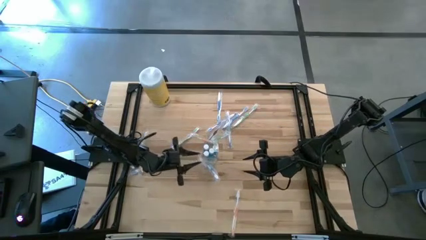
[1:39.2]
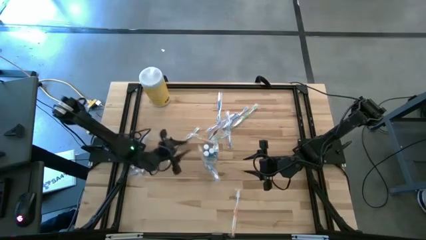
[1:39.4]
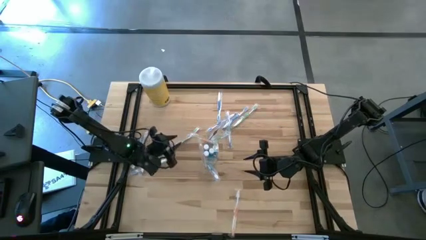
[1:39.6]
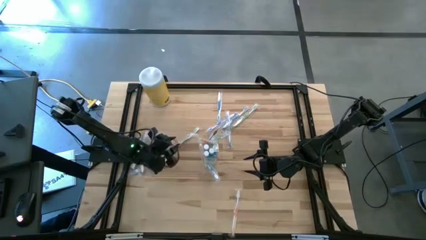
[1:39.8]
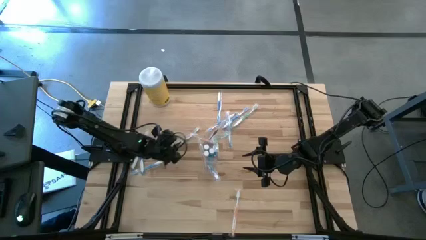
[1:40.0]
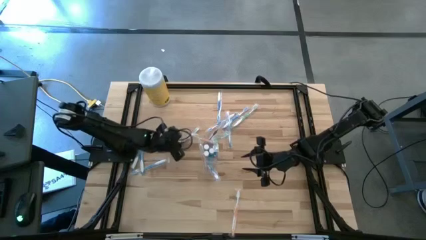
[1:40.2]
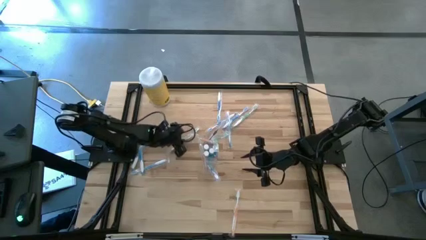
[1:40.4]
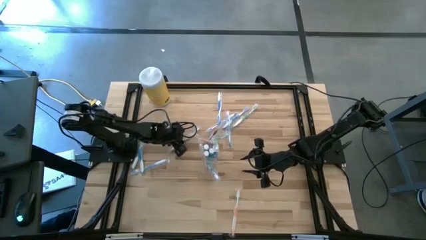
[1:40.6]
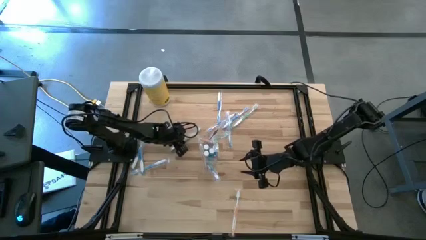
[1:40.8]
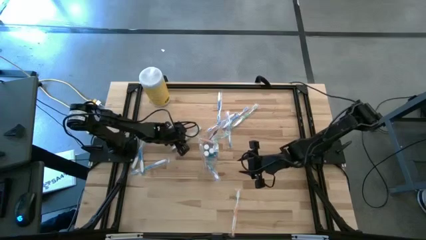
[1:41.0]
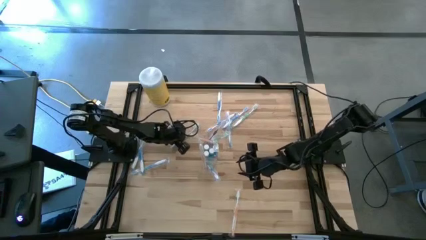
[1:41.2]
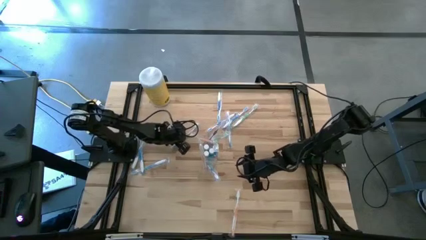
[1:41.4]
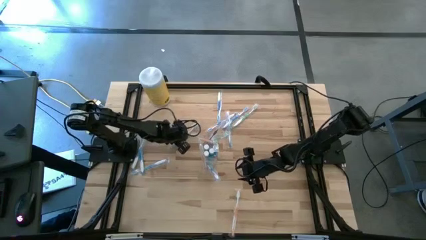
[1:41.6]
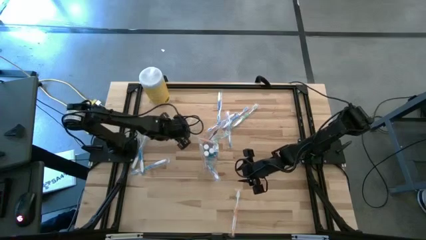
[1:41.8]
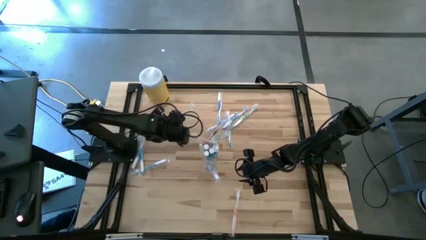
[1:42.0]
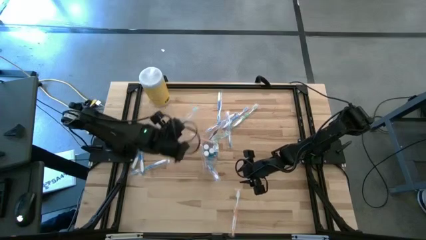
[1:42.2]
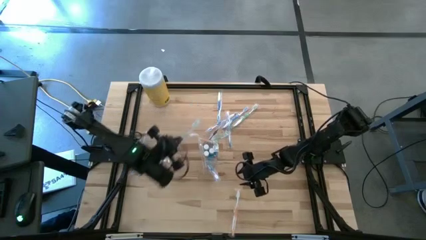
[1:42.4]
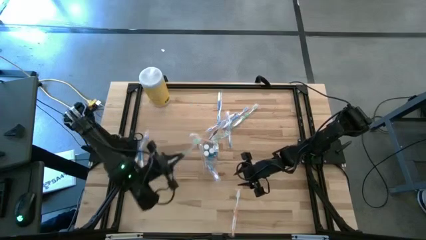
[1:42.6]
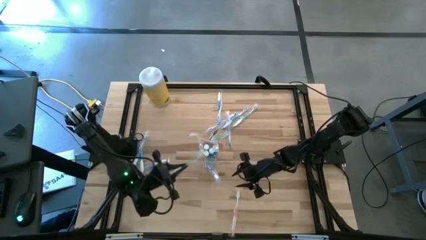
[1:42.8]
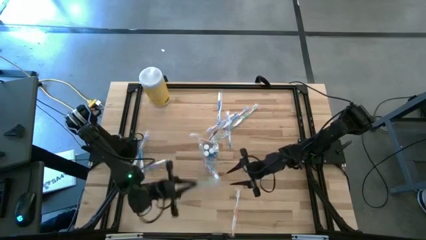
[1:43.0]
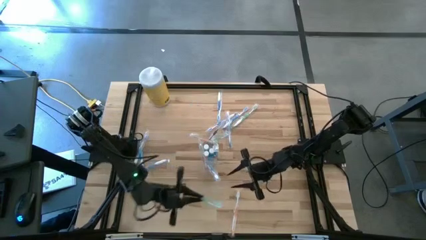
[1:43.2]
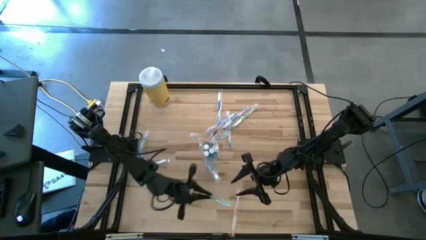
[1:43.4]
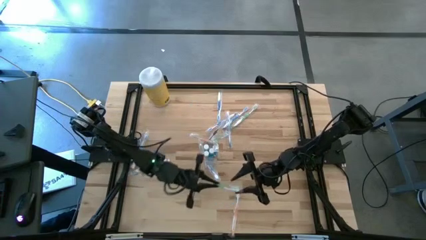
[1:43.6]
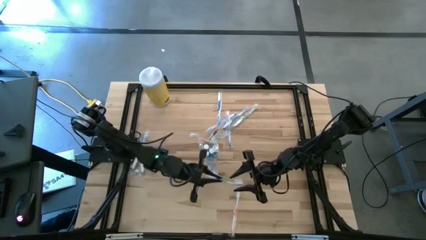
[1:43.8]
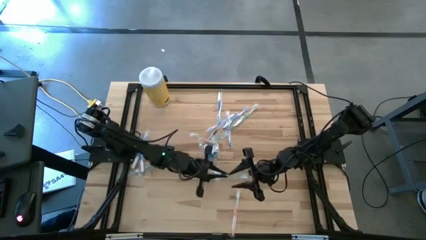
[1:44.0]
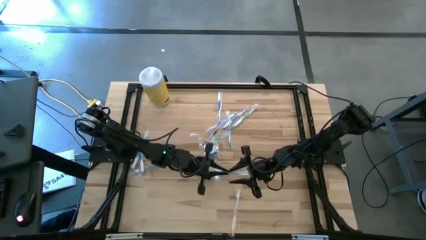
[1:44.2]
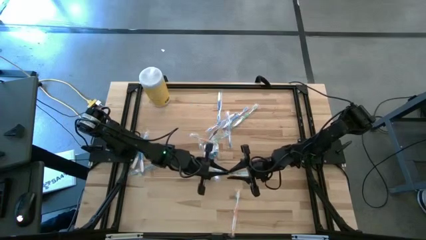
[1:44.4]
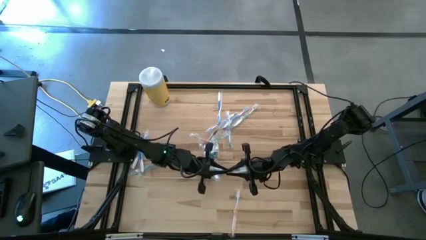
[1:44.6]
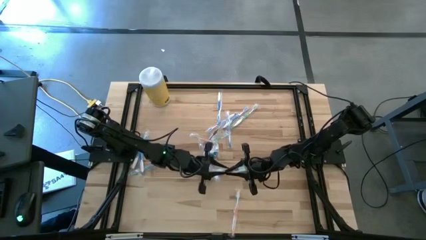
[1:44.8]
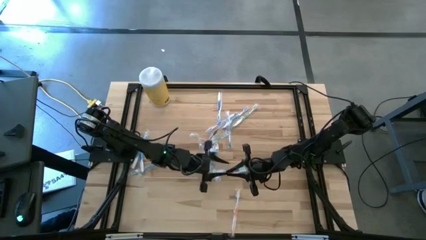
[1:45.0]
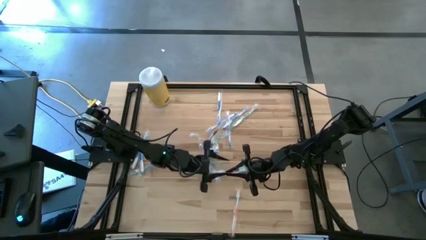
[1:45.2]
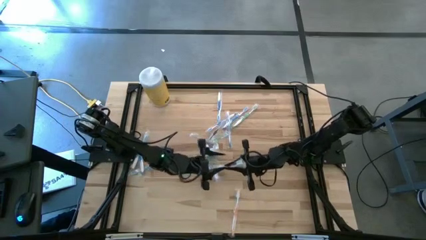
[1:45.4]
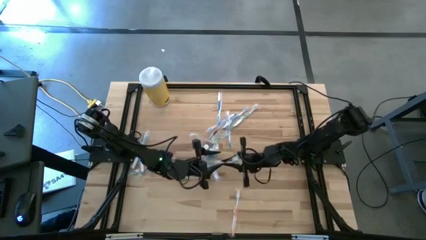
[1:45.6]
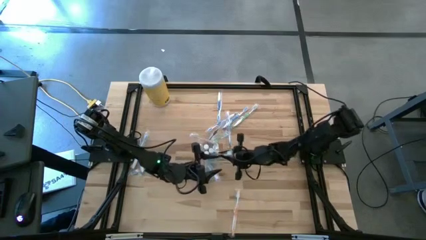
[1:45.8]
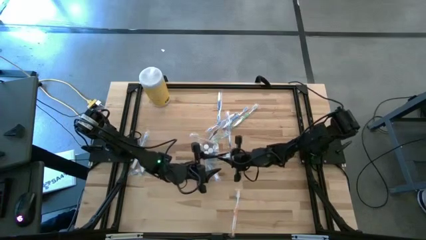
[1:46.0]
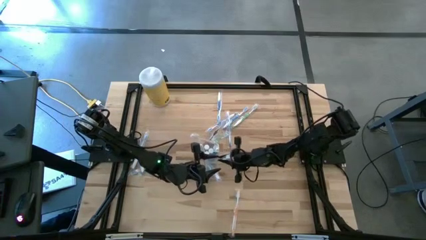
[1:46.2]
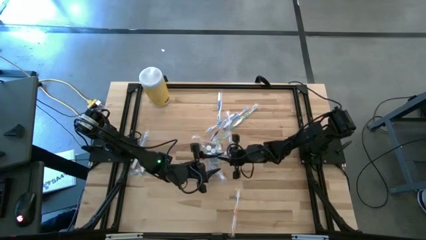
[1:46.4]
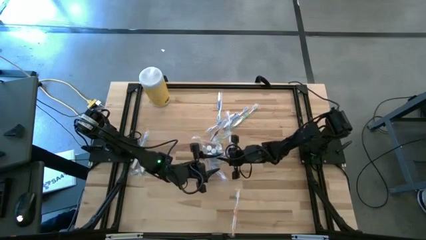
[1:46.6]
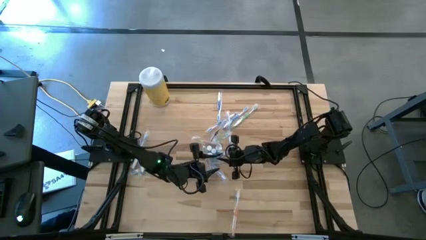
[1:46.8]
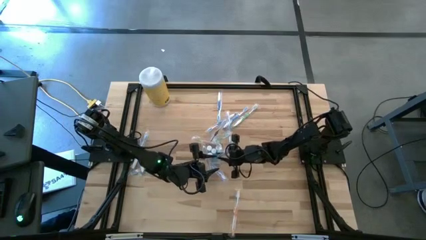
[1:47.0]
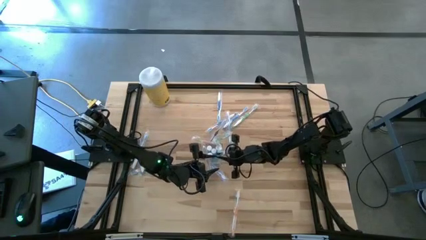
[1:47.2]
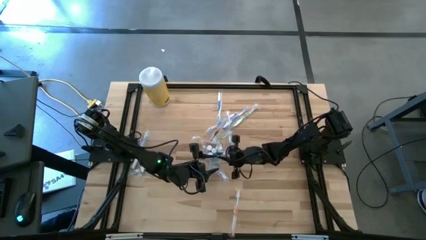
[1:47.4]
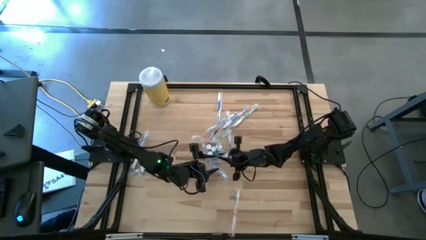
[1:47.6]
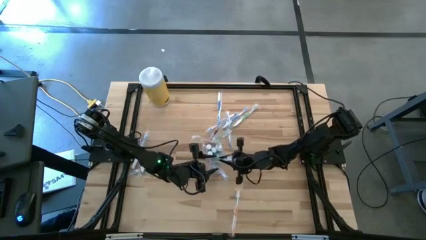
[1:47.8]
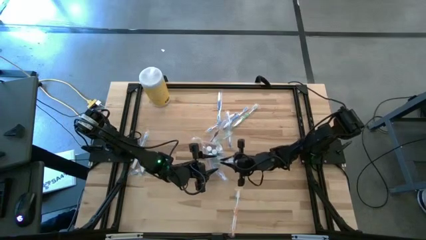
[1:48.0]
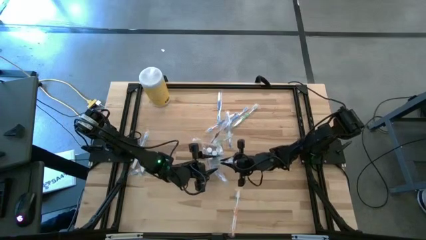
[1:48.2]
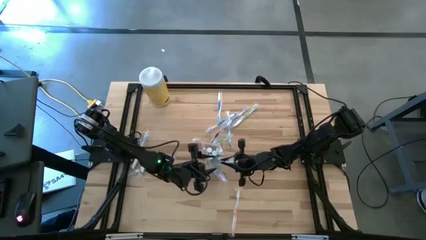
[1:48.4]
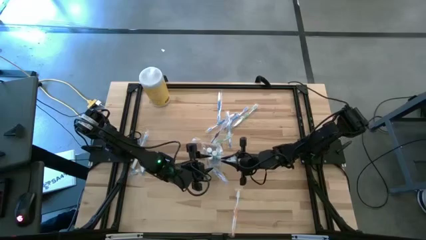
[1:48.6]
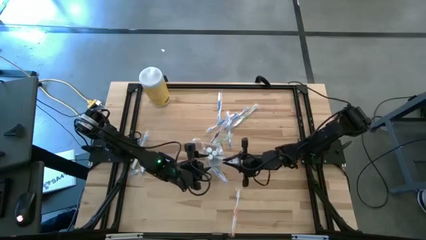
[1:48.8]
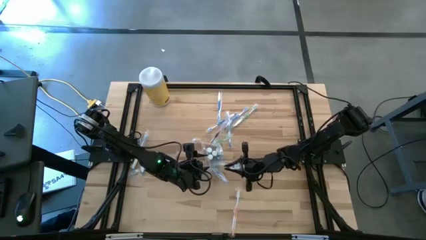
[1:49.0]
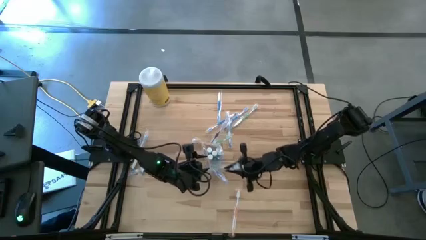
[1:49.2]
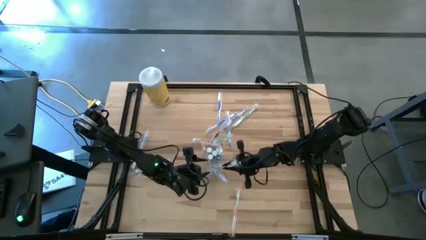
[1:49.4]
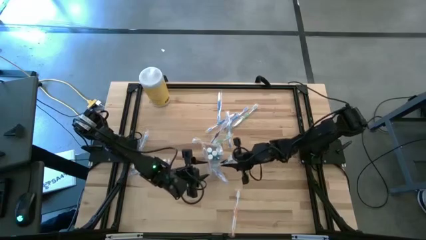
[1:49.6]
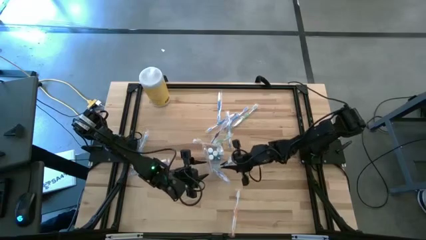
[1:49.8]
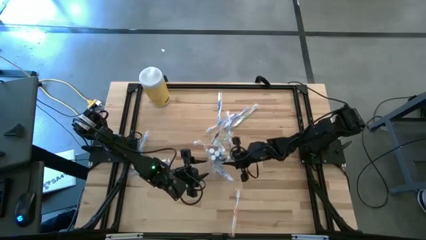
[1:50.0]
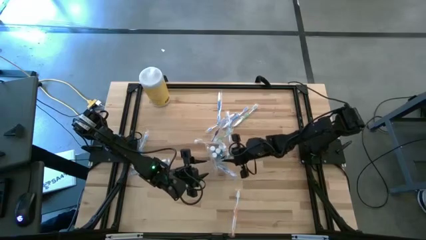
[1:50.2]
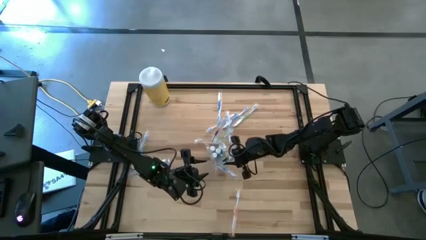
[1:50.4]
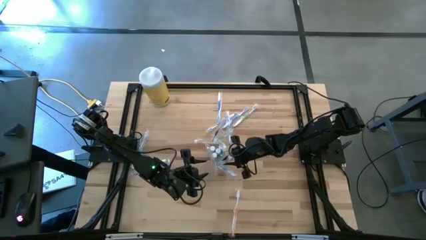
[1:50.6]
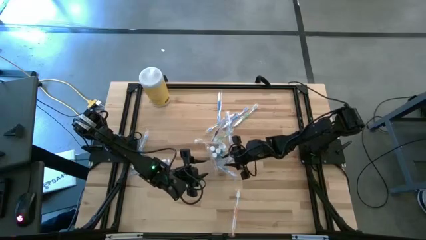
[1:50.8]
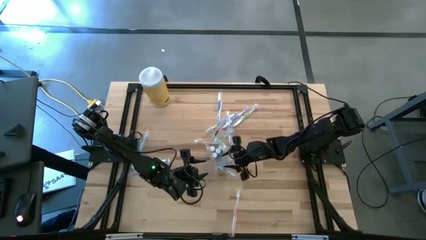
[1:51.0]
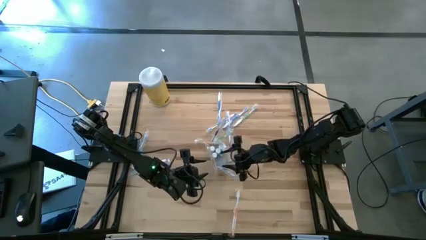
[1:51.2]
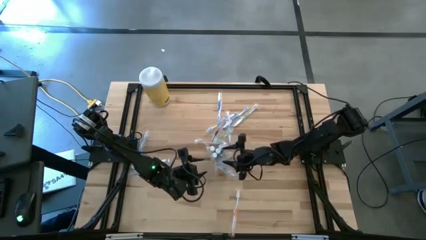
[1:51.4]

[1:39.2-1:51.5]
Task: Pick & Place toothbrushing station
Put the green toothbrush into the transparent organizer
